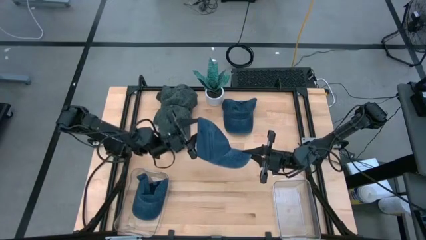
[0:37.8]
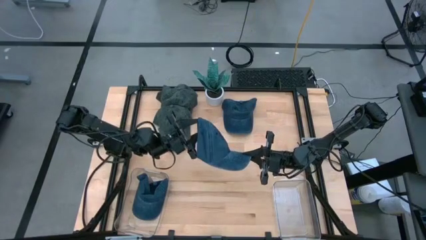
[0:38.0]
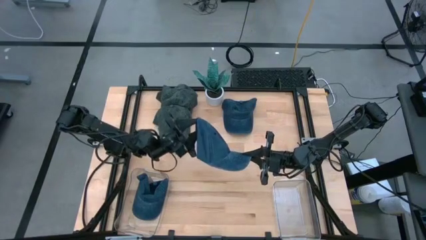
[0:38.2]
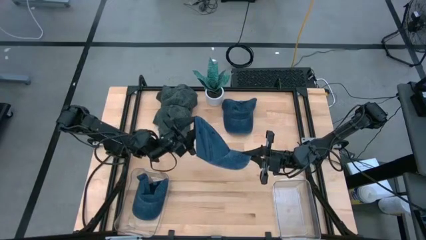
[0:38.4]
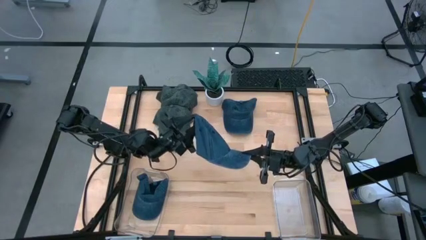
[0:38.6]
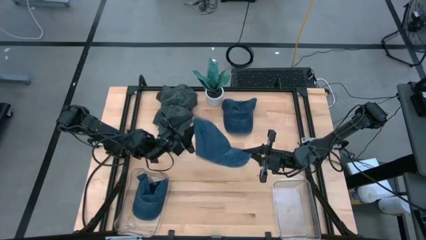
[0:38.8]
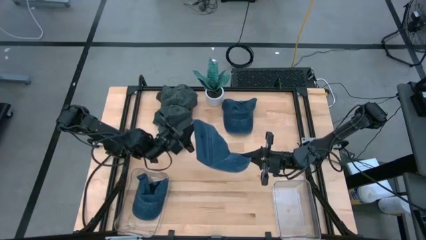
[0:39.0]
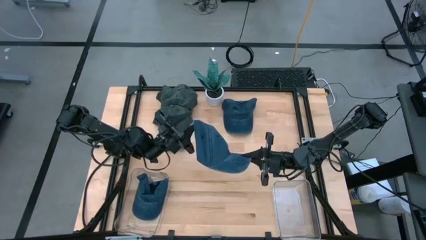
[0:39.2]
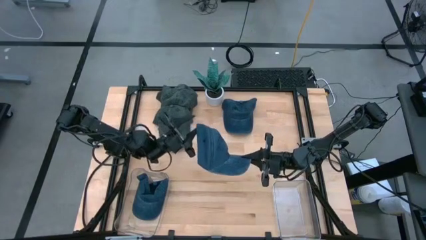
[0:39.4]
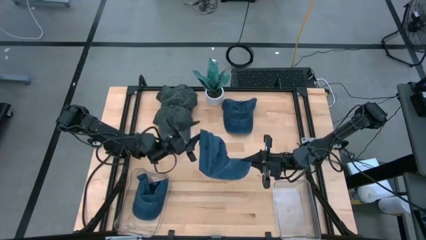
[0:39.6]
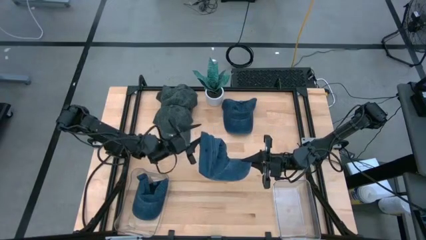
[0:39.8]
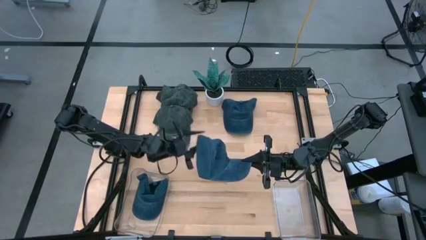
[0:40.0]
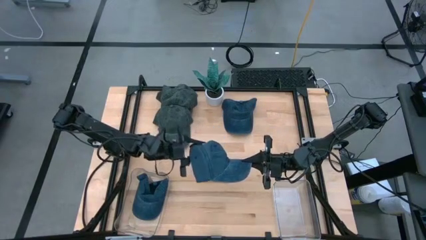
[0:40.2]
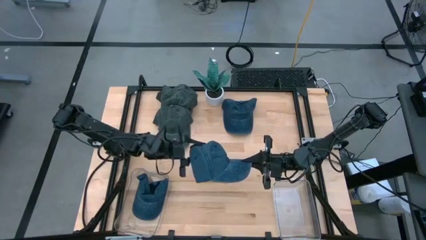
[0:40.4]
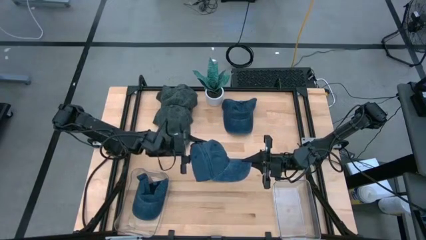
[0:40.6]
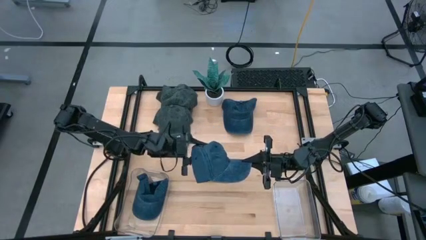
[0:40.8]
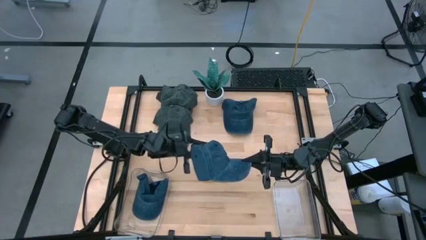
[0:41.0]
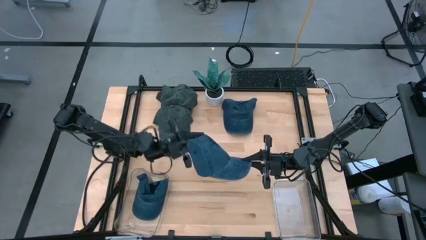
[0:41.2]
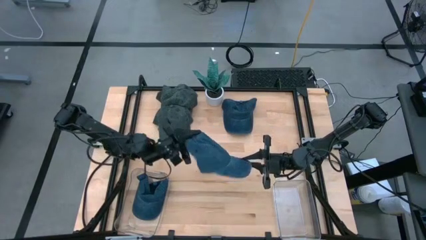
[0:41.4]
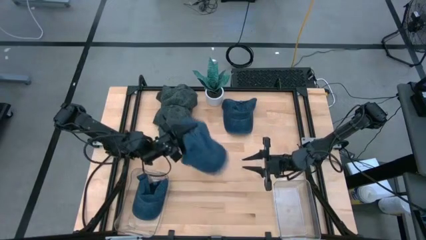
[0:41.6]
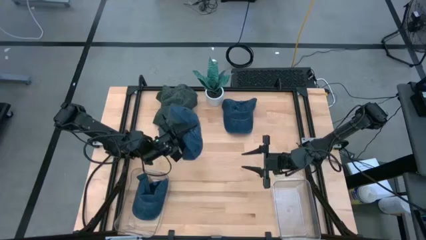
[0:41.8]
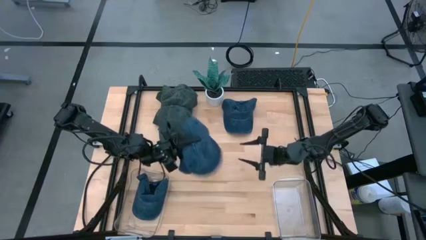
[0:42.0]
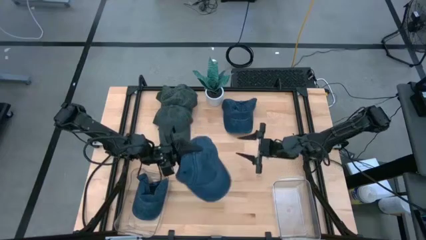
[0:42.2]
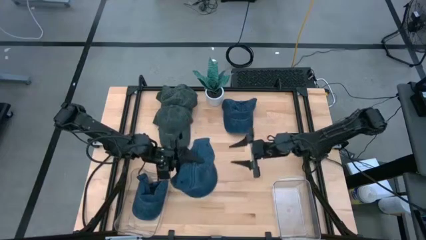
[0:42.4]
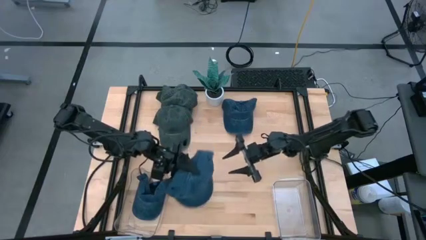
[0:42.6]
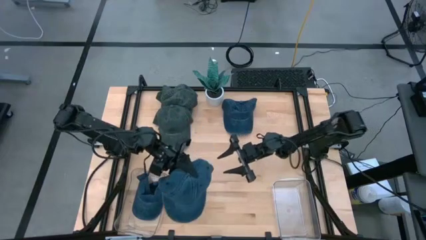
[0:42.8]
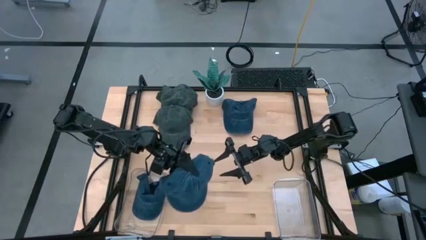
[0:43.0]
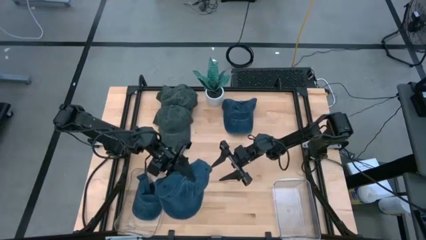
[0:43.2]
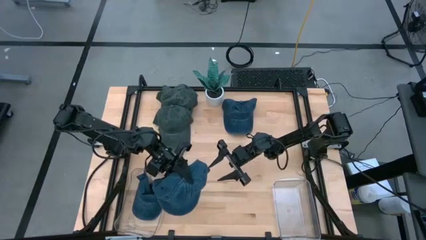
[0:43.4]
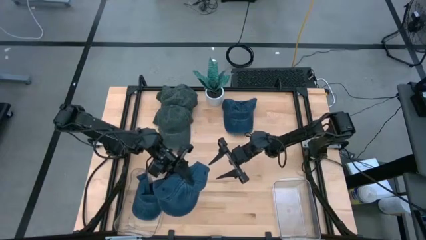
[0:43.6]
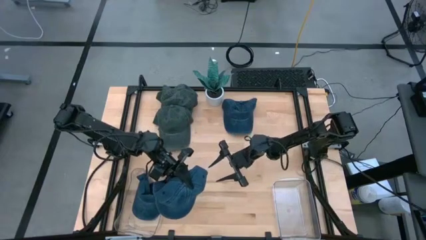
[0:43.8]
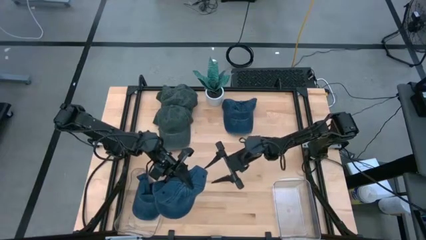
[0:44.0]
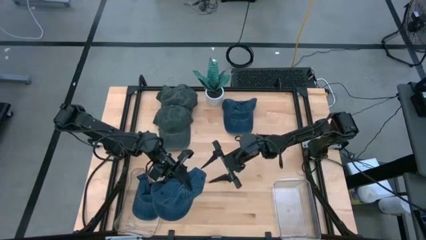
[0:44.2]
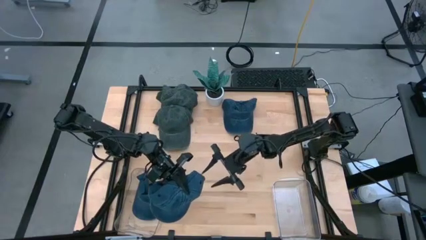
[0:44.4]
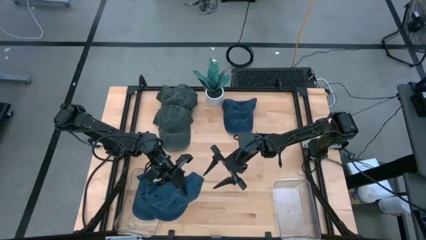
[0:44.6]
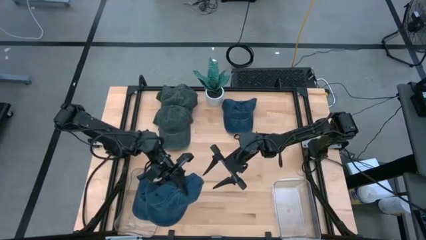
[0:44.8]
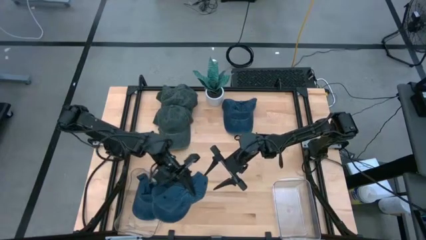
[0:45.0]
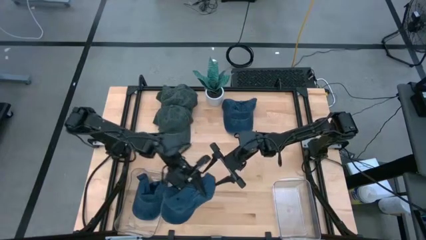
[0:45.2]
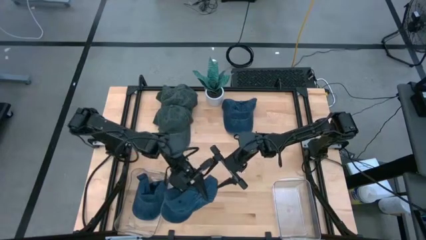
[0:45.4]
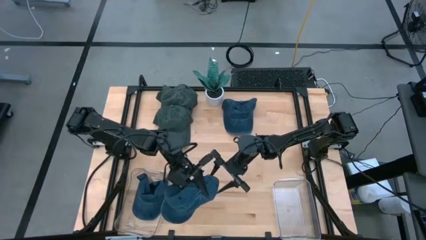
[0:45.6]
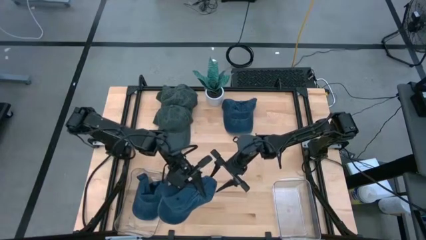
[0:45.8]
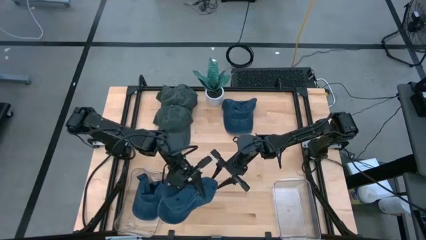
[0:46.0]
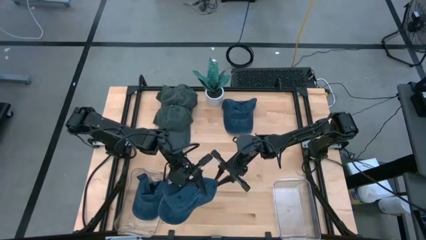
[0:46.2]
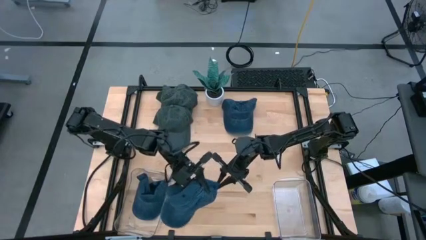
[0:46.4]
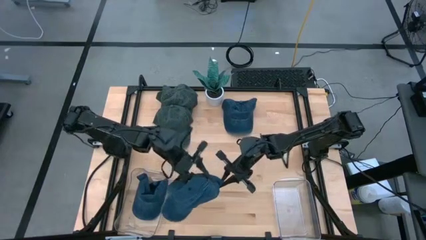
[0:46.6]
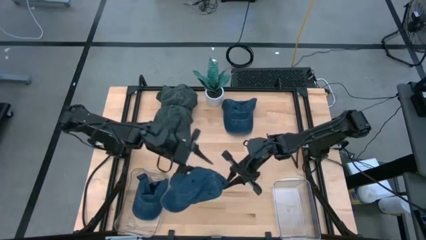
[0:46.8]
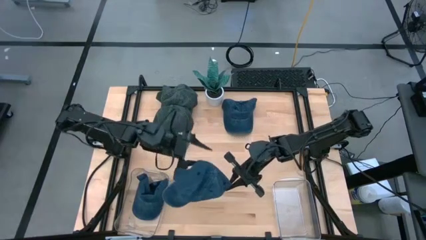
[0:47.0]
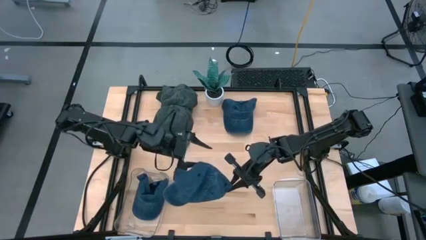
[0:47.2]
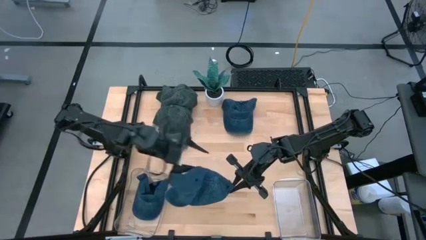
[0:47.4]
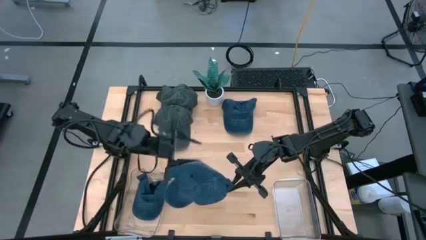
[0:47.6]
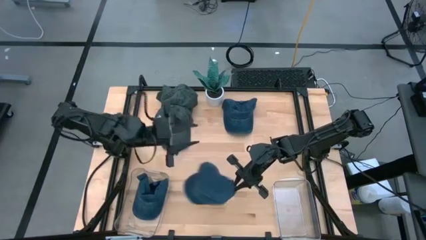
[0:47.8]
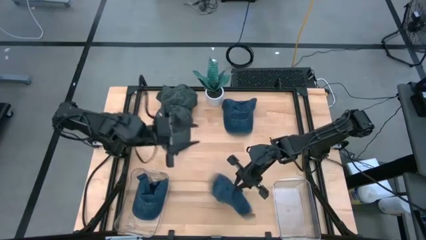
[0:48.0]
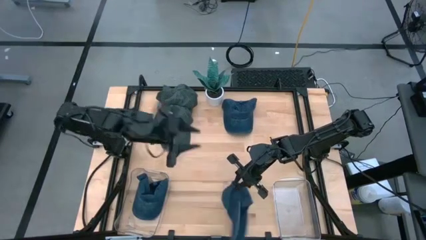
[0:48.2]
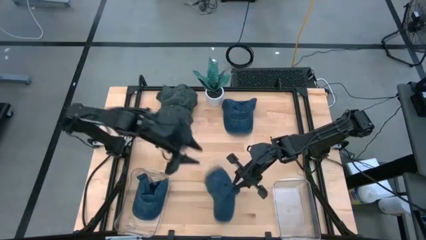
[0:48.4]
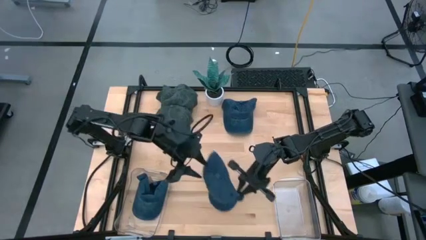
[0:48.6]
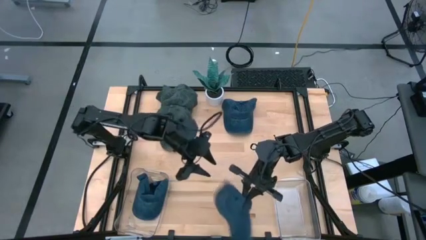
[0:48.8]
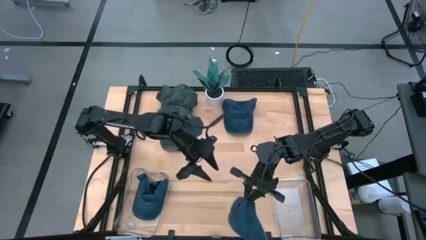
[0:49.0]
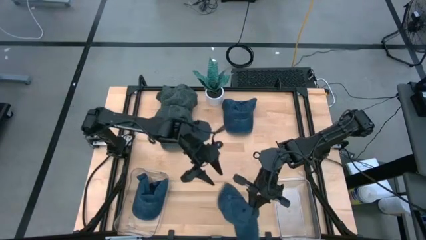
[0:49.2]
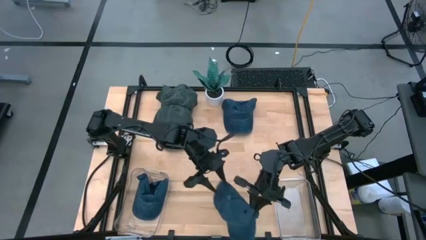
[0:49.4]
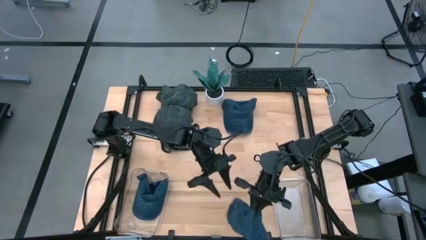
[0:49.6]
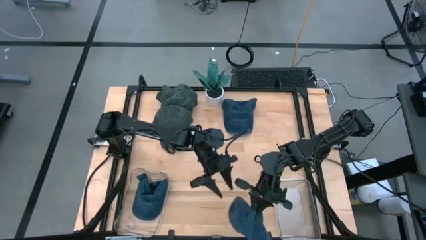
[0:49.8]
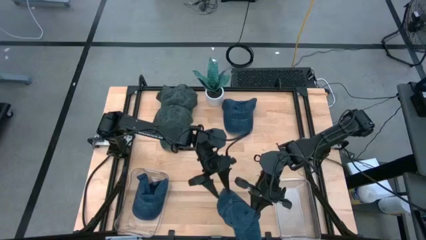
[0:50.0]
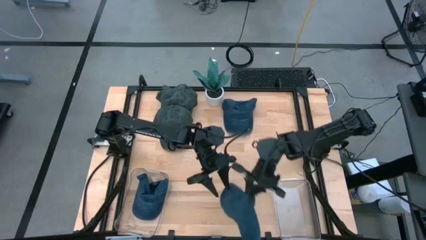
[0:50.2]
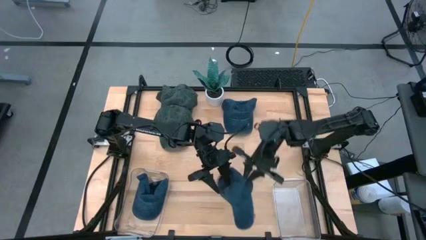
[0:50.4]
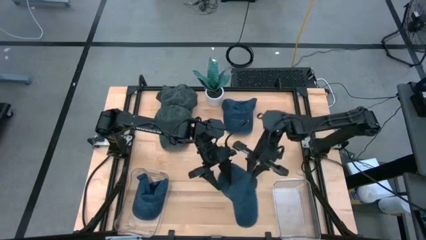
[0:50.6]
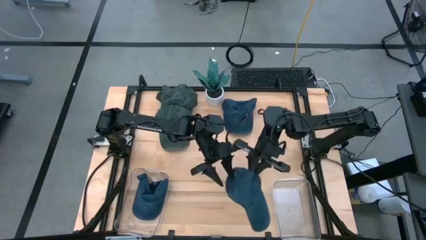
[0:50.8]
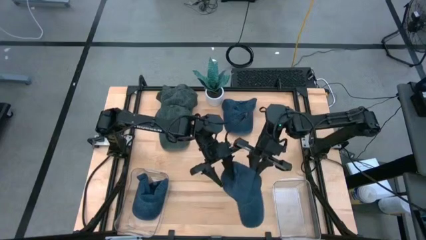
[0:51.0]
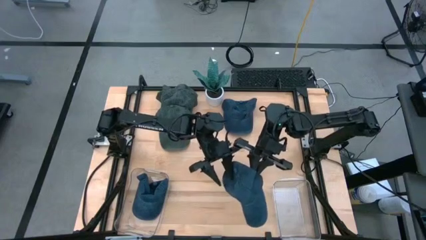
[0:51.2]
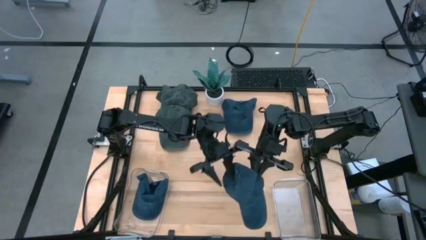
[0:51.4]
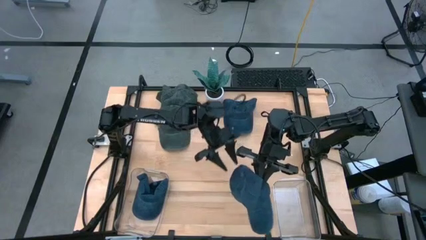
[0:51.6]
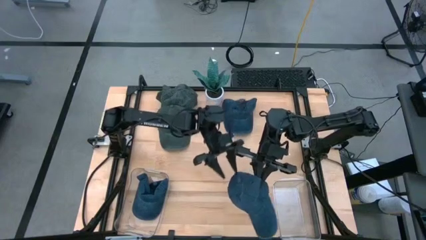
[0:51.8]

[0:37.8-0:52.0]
Task: Pick & Place hat
Put the bottom blue cap into the left transparent bin

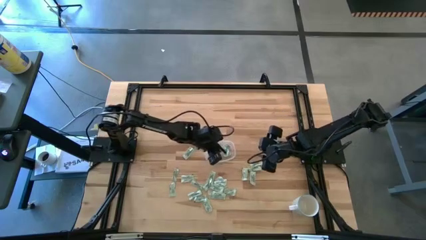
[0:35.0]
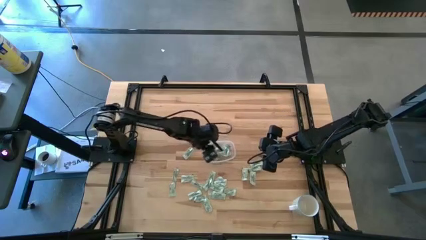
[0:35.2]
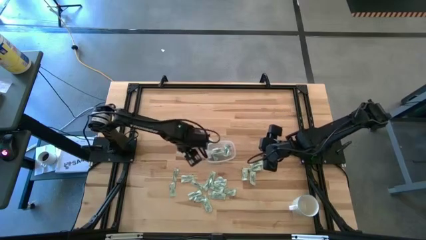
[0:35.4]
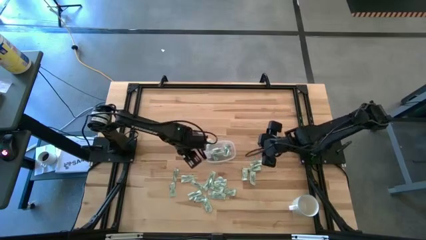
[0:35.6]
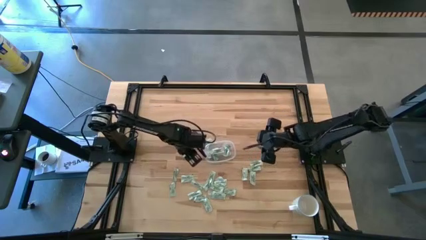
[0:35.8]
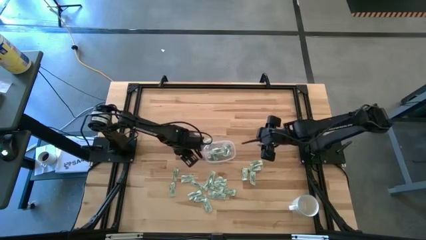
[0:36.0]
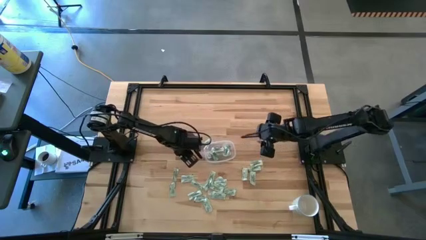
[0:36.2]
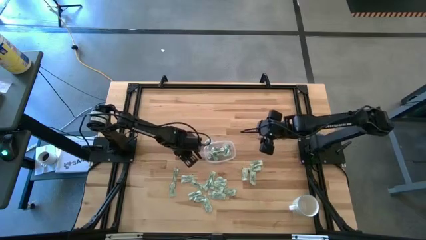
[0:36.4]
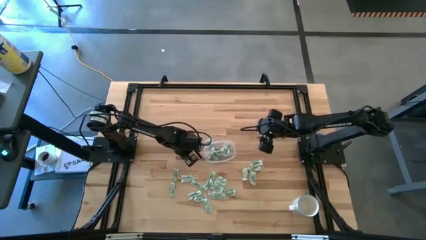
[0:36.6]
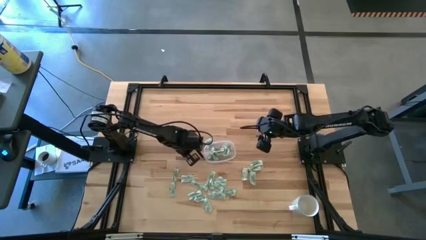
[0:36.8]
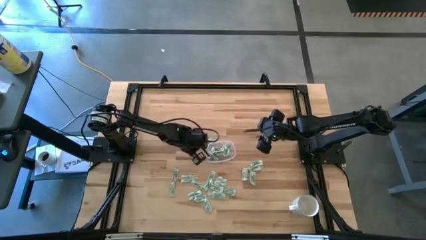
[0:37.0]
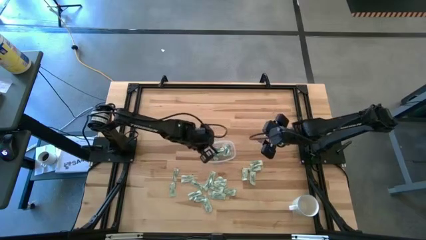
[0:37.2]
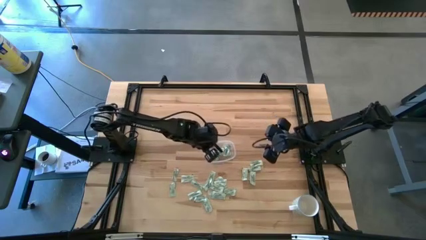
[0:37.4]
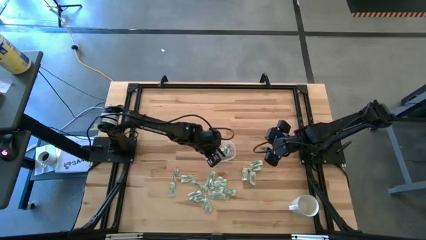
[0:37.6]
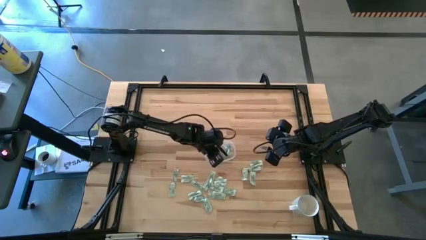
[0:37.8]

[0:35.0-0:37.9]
Task: Pick and place Stevia / Truvia into bins
Put the stevia packet into the transparent container
